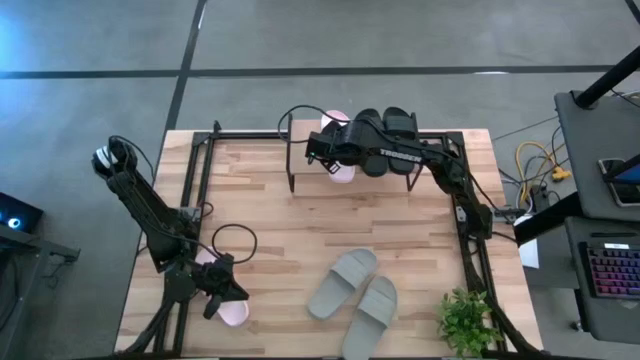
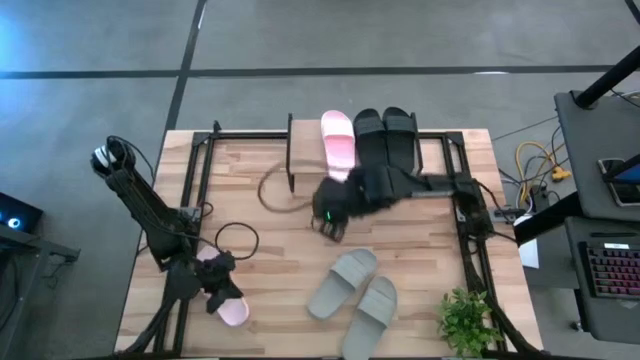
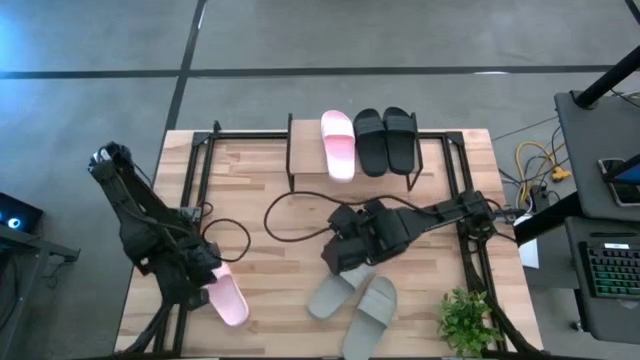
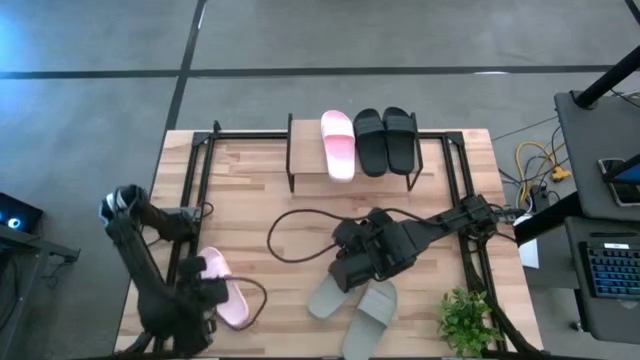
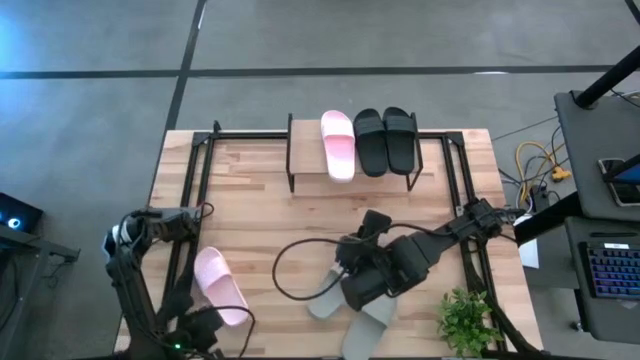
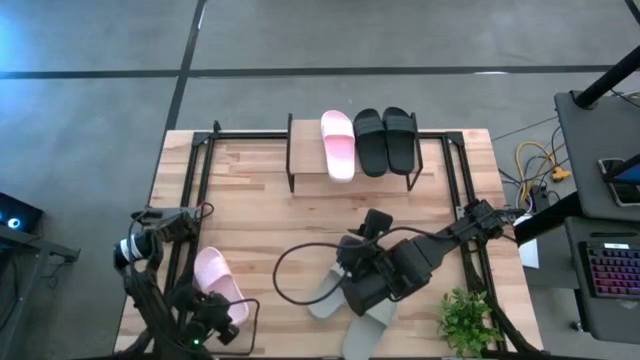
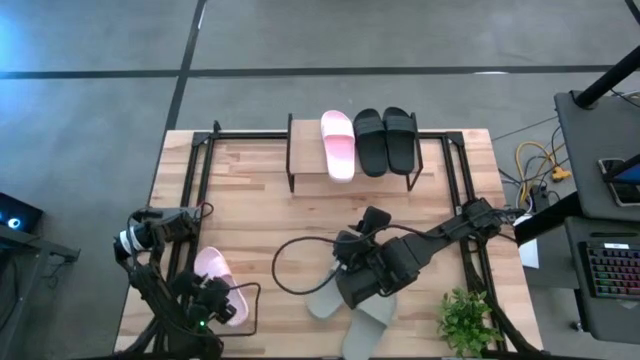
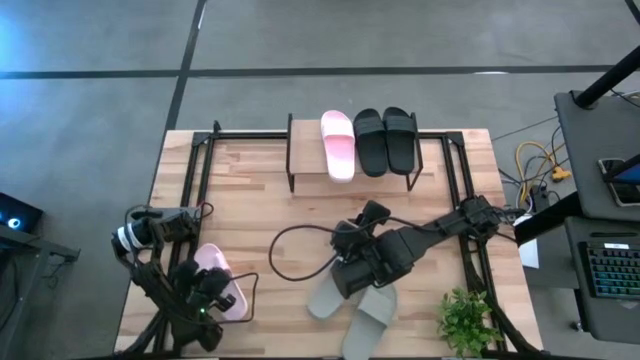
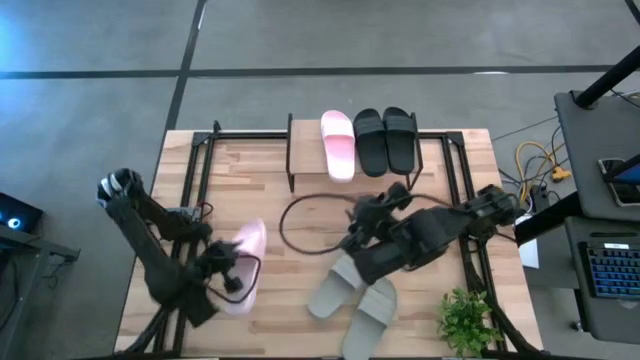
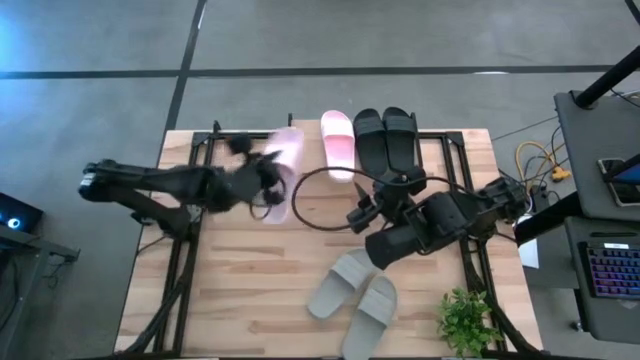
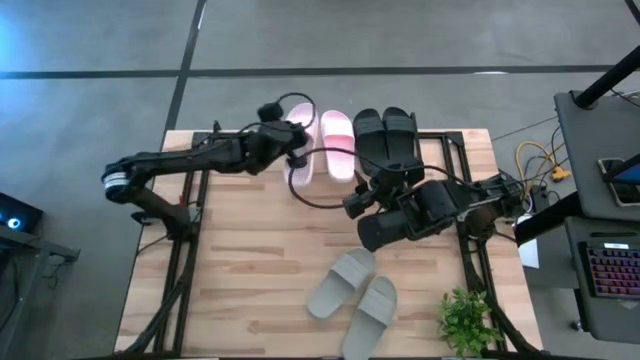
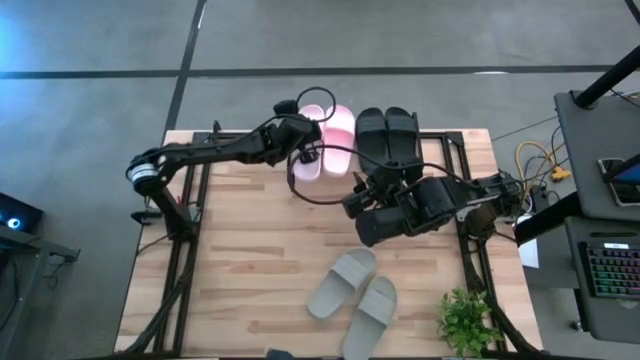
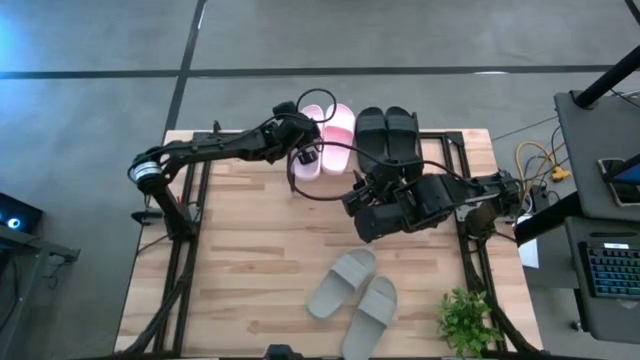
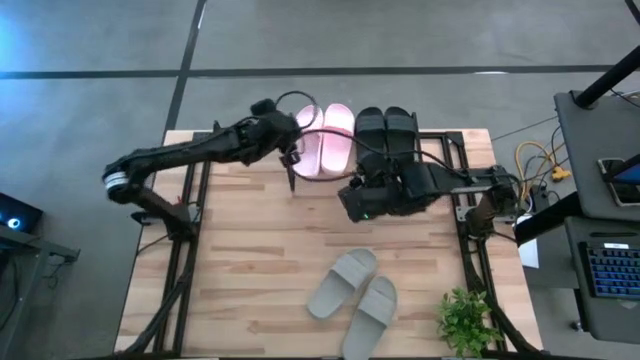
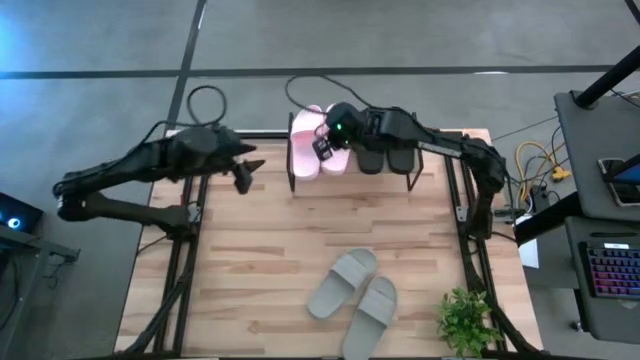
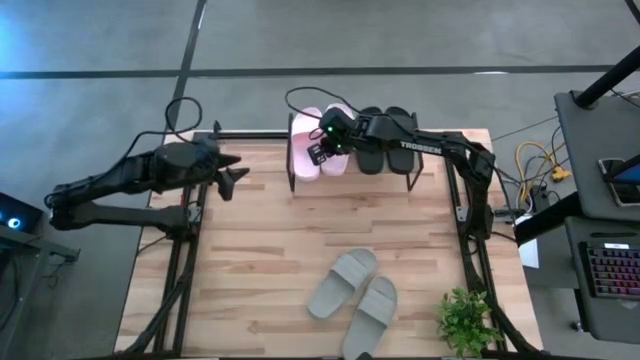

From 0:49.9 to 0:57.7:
Task: Pick and place slides into the shelf
Put the left pink slide on the shelf

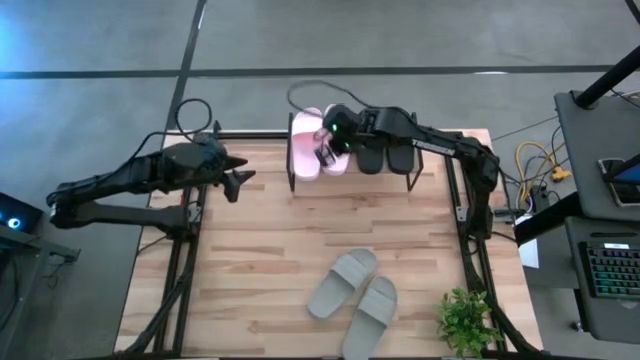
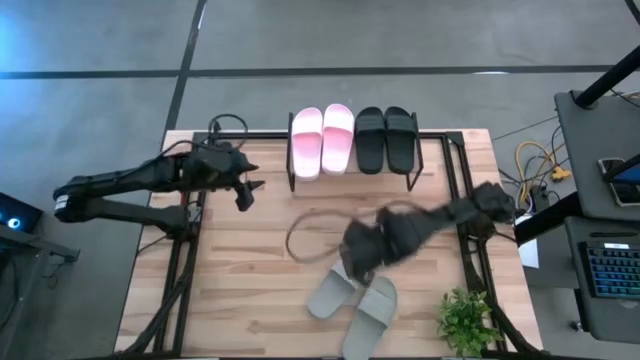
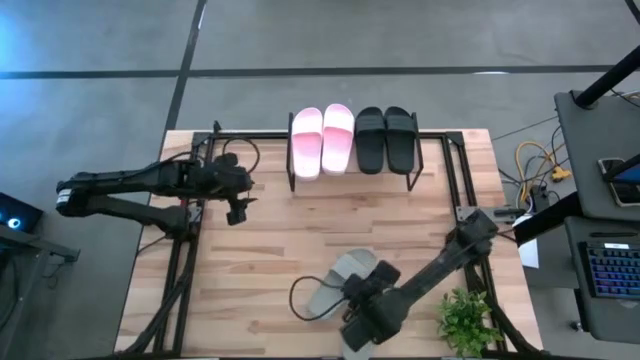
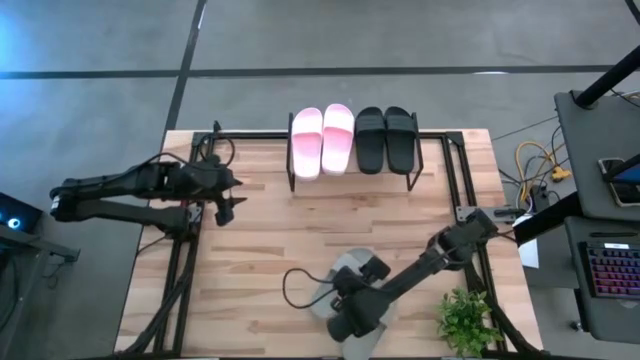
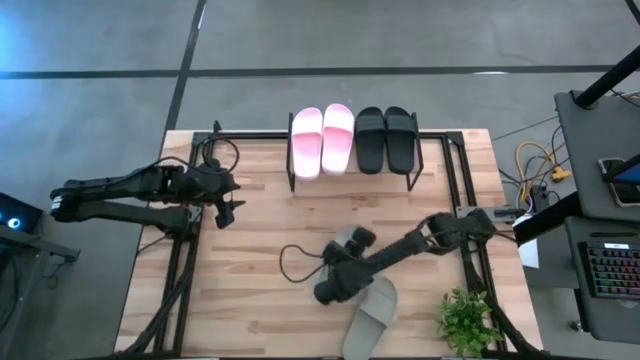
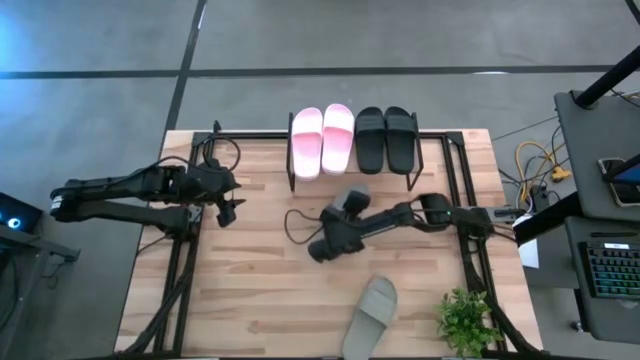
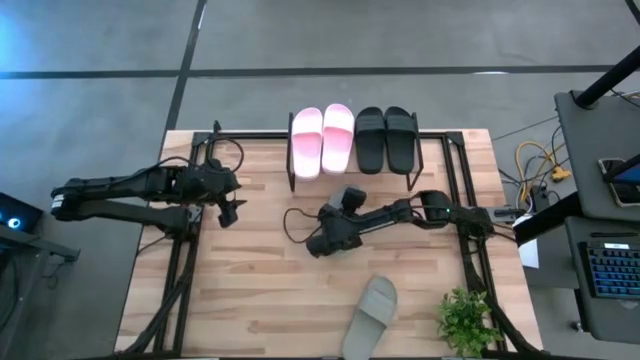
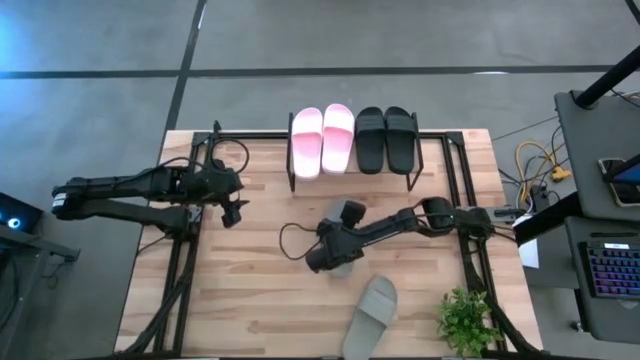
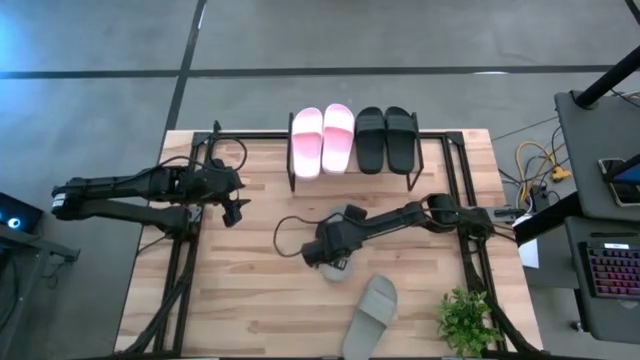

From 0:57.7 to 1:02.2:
Move the left gray slide from the bottom of the table to the center of the table

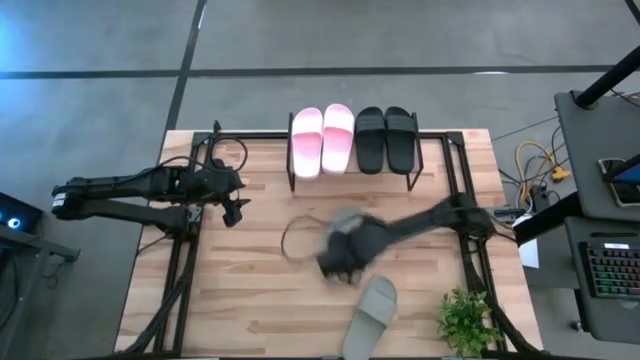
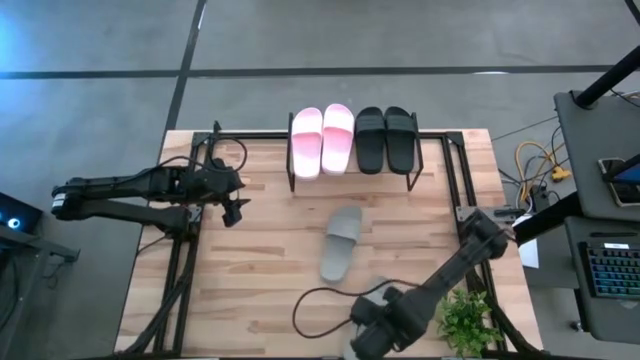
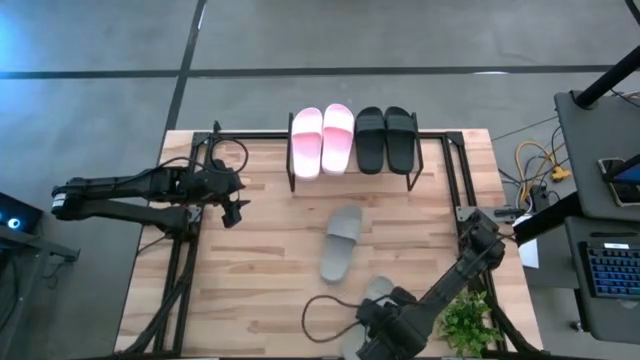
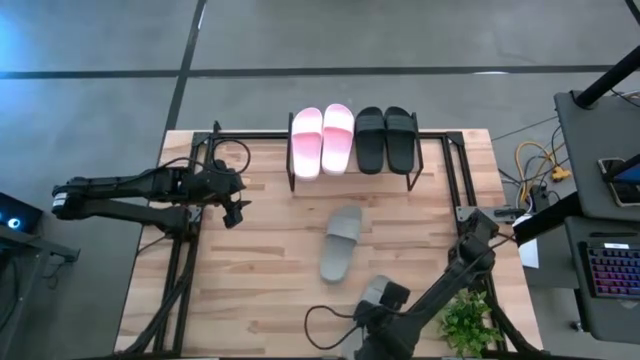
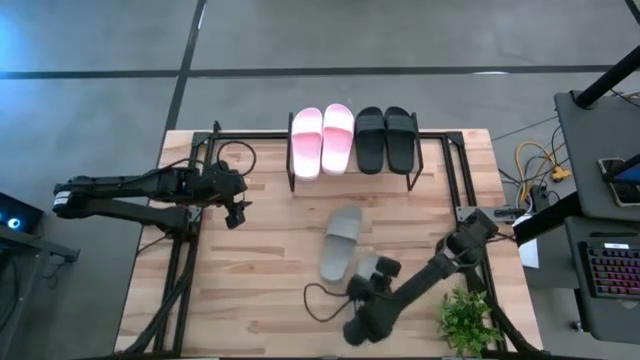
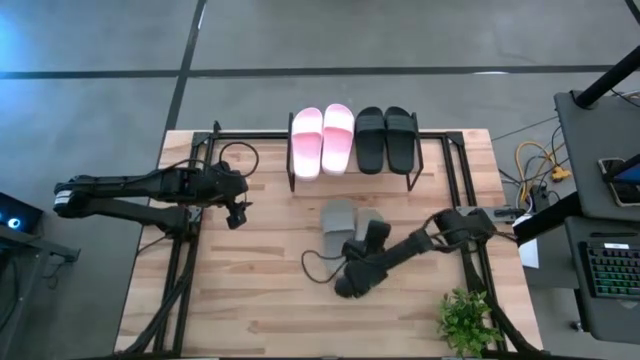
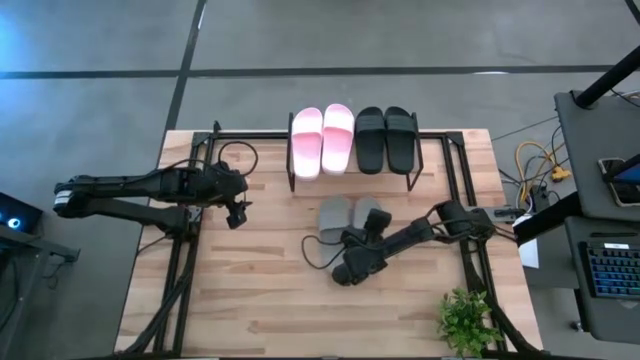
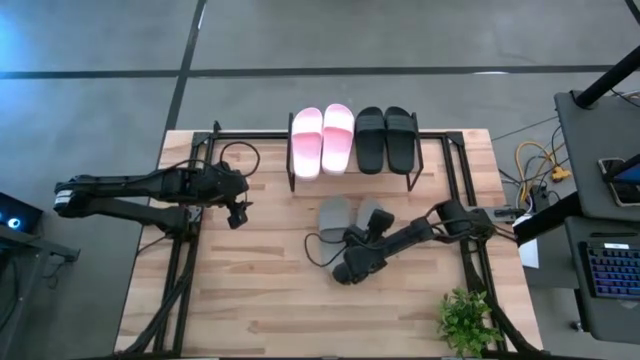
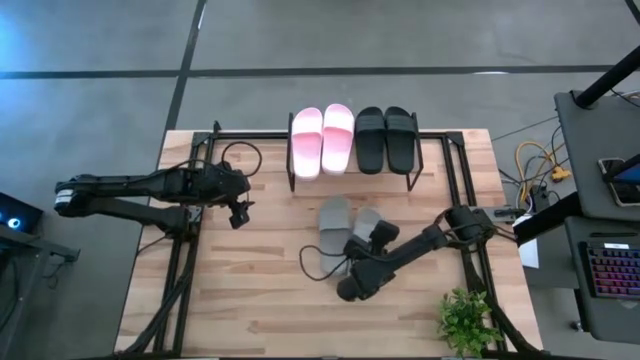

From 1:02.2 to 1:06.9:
Move the right gray slide from the bottom of the table to the center of the table

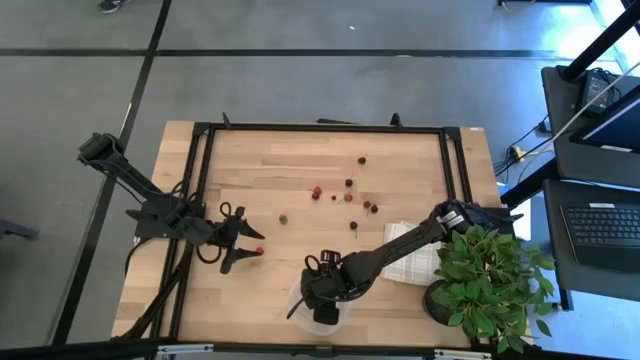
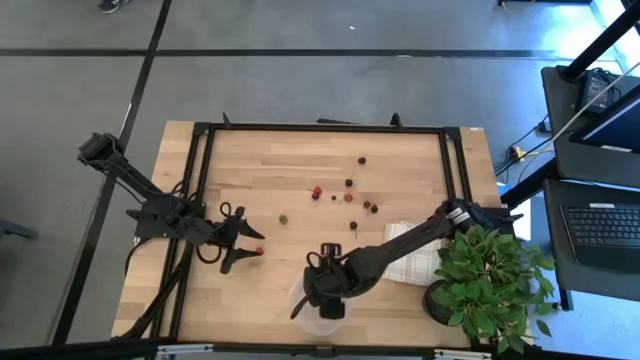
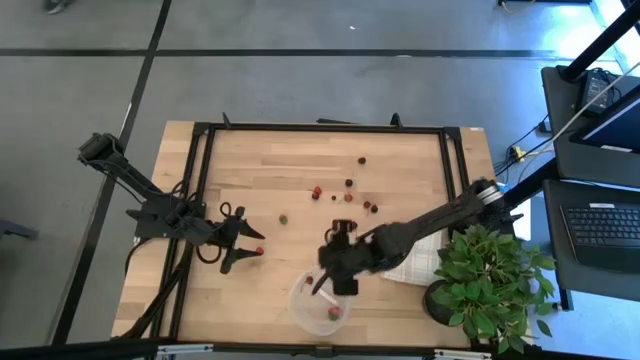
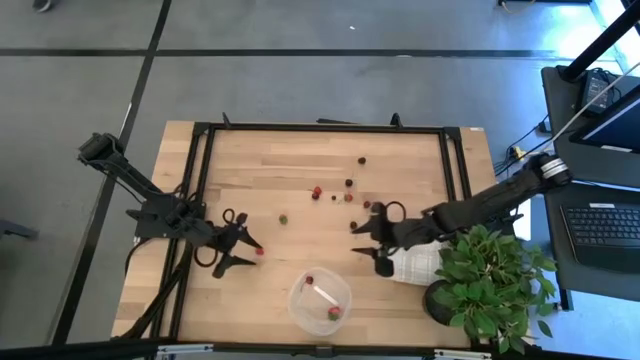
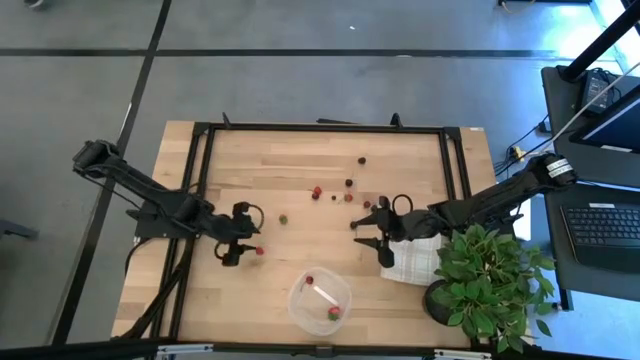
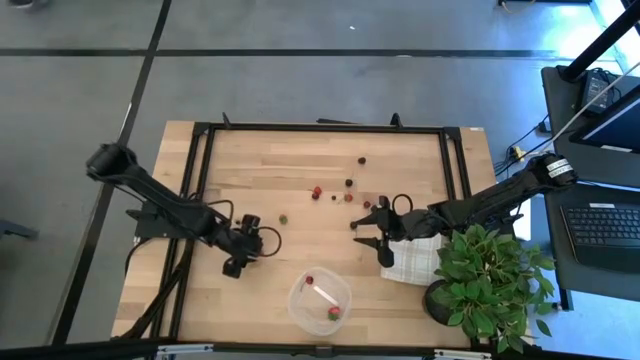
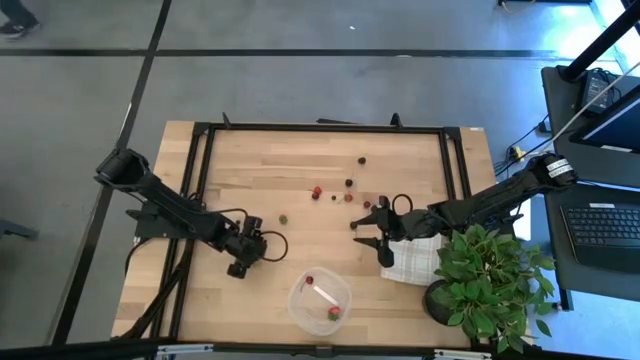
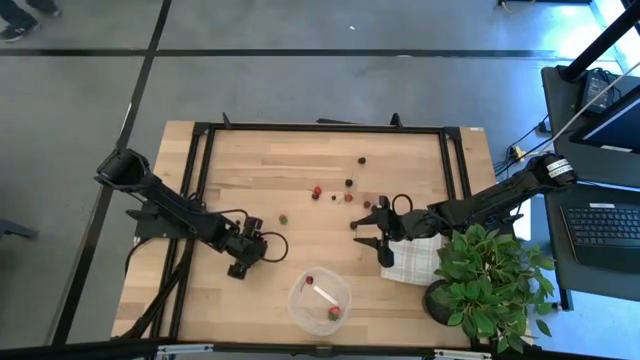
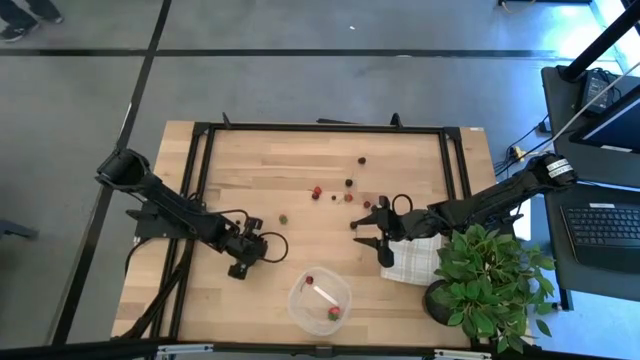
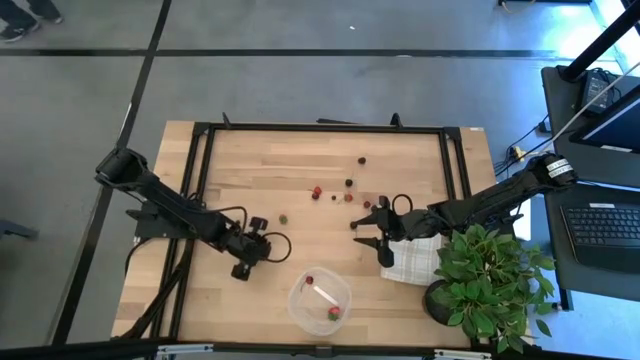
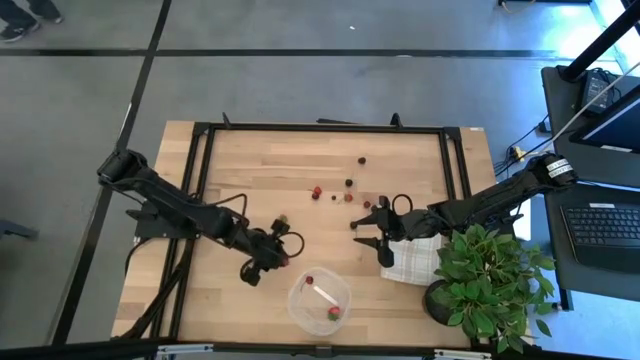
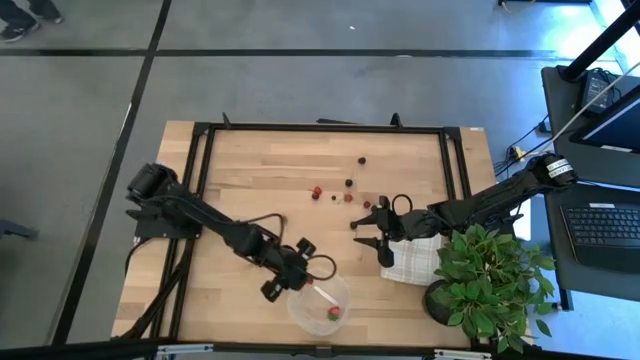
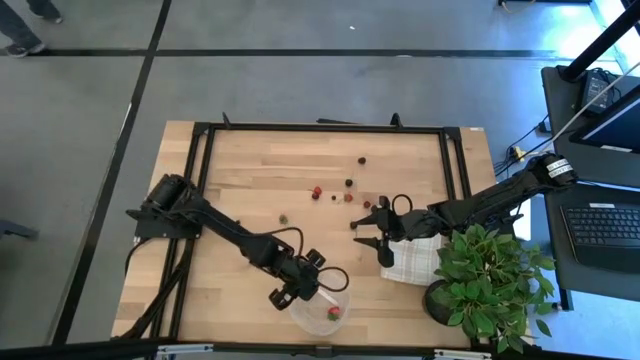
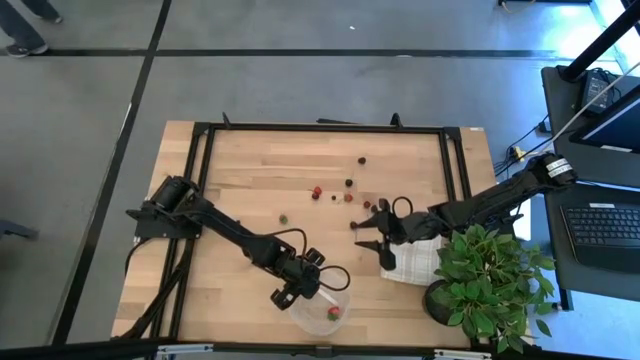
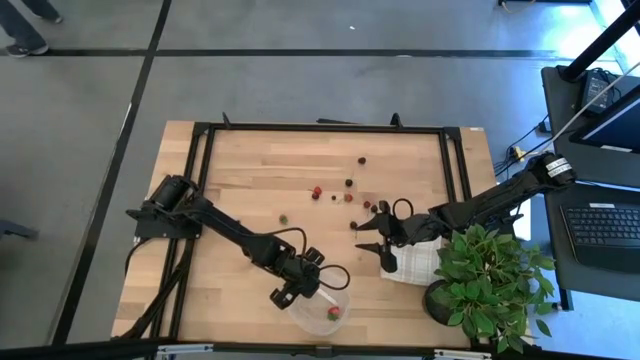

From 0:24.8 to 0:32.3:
Task: Pick and placing Produce into tupperware
Put the raspberry in the bottom transparent bin
